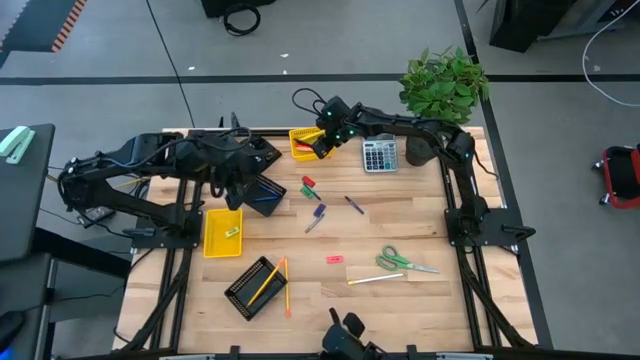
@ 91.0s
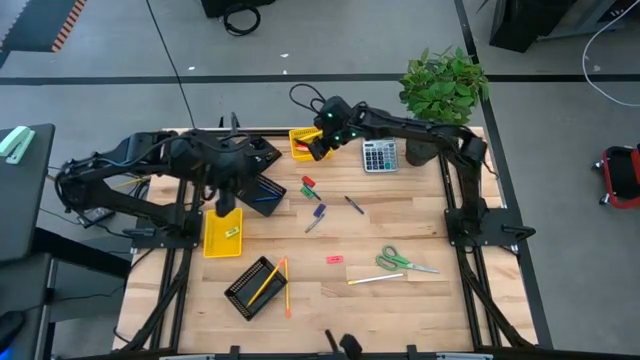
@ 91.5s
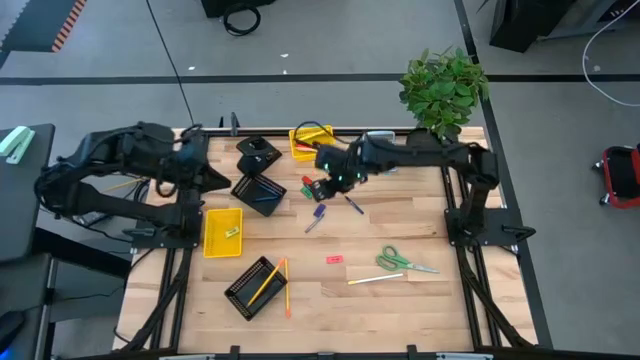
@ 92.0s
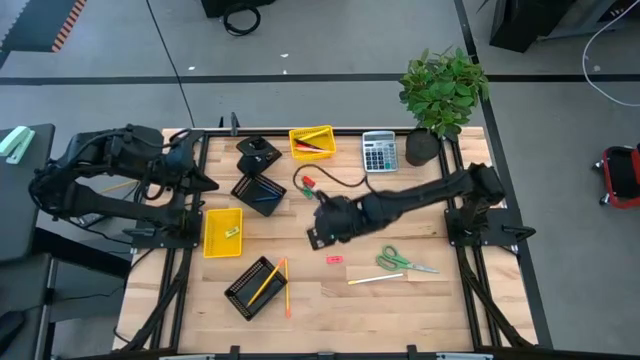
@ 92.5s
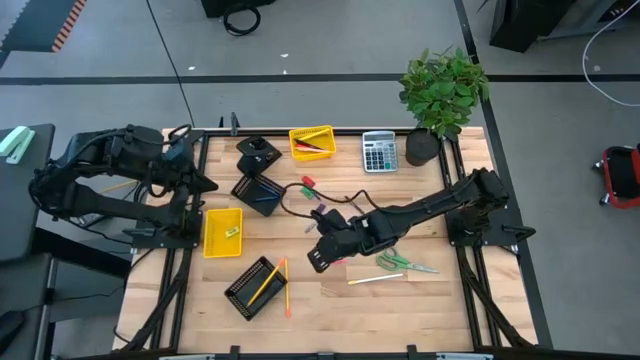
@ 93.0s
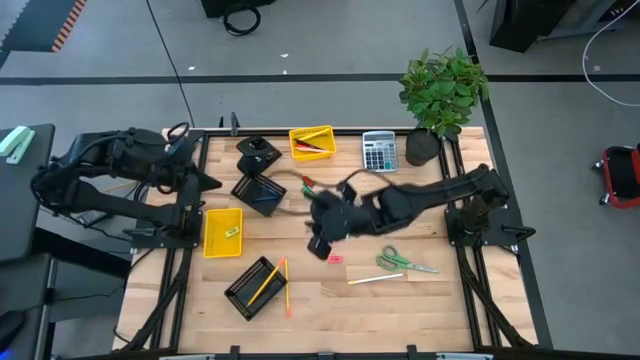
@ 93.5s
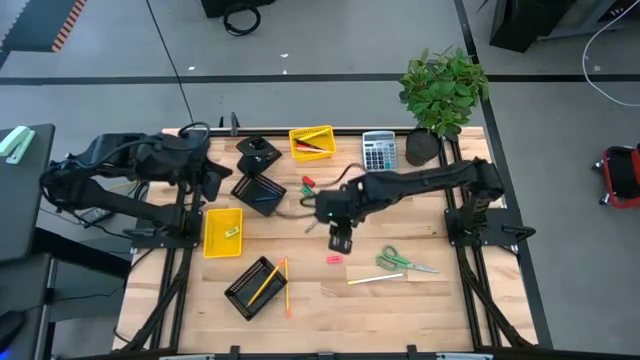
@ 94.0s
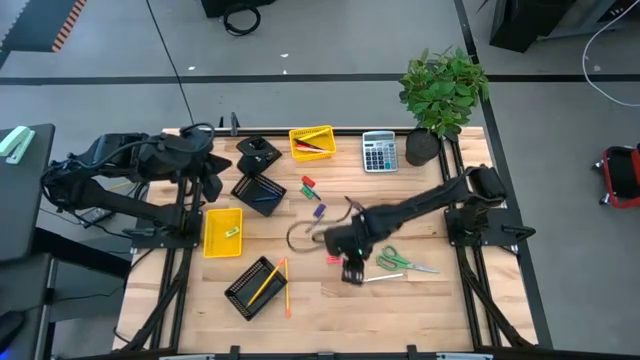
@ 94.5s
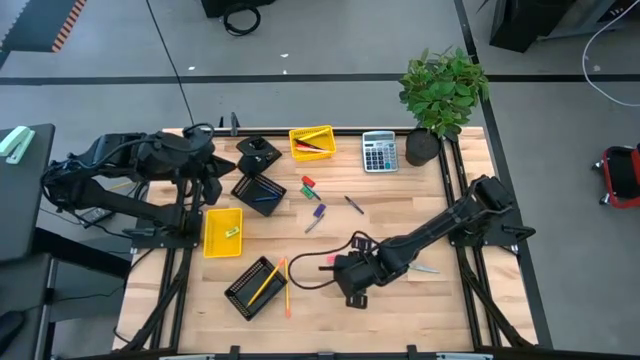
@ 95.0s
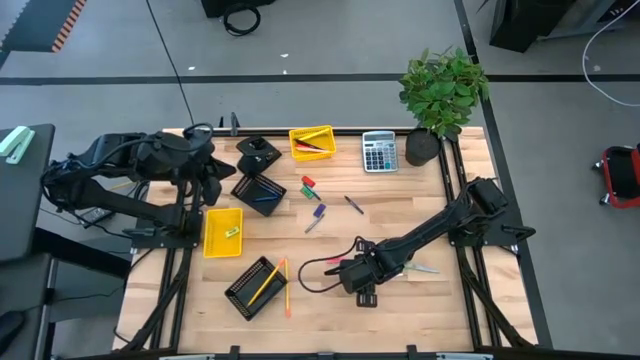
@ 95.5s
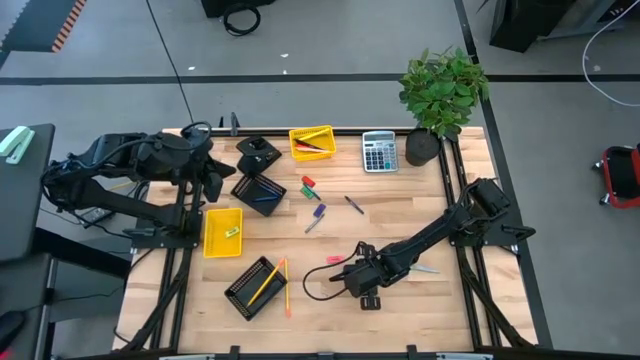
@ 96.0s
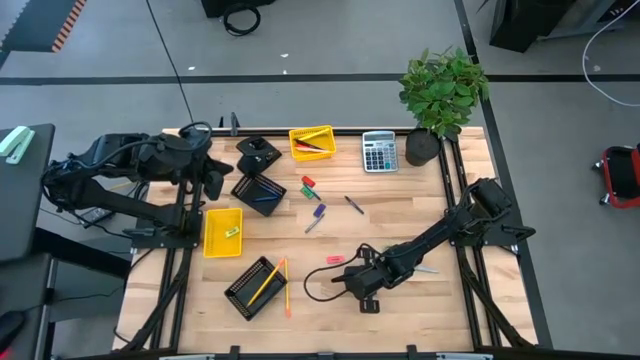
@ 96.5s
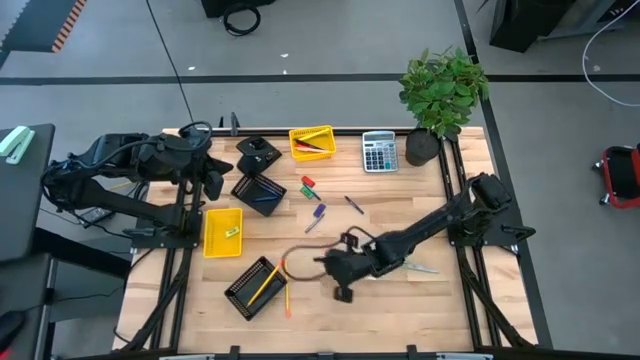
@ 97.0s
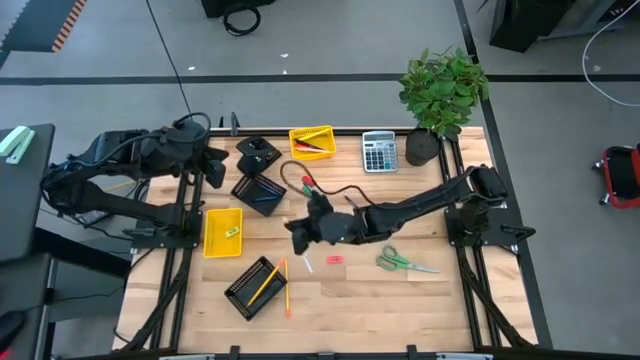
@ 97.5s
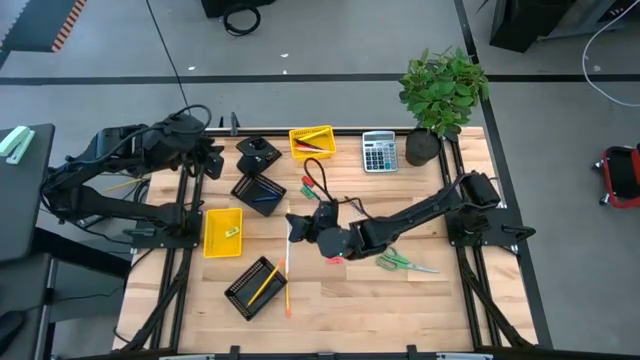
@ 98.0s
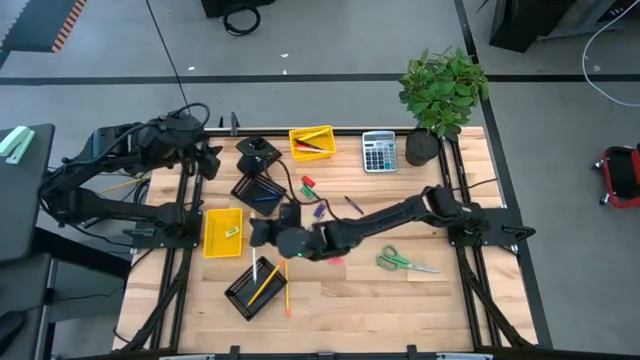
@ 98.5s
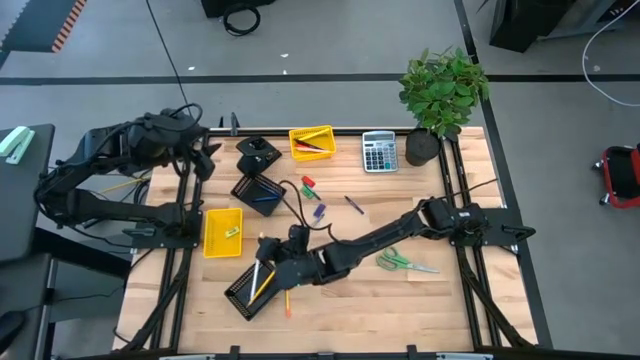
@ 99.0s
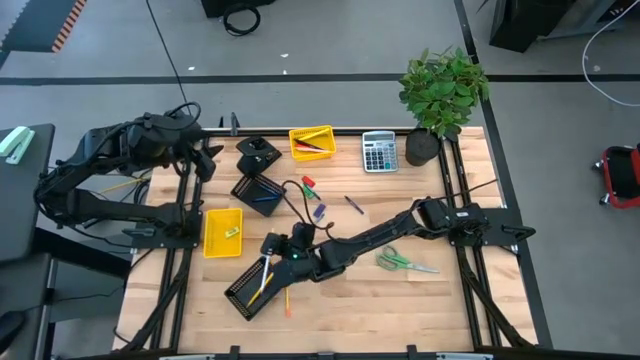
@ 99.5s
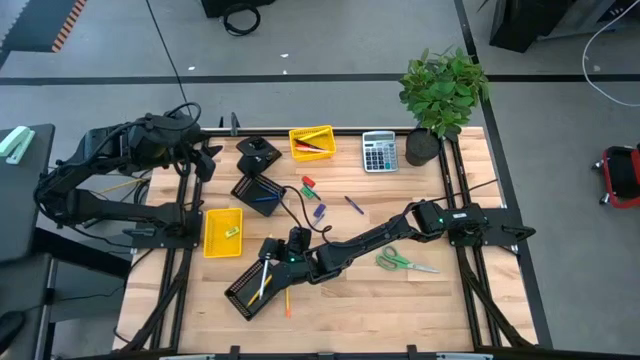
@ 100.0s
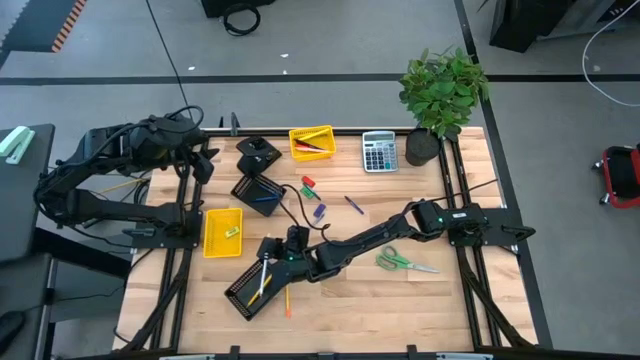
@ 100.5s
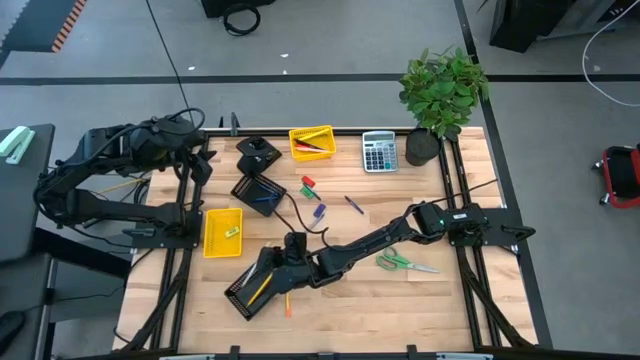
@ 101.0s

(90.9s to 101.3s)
Task: Sort crayons/erasers/pens/pencils in bins
Put the white pencil into the bottom black basket

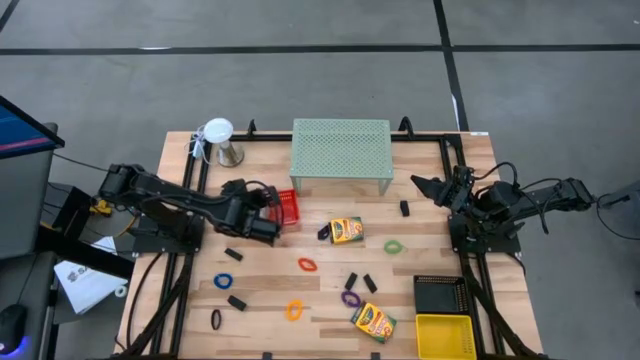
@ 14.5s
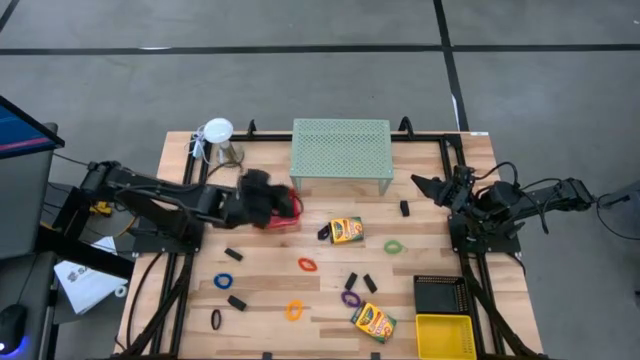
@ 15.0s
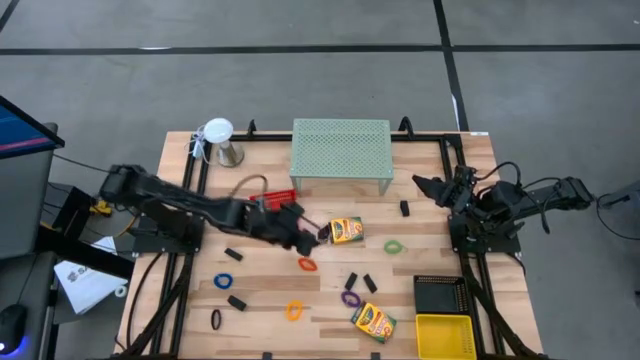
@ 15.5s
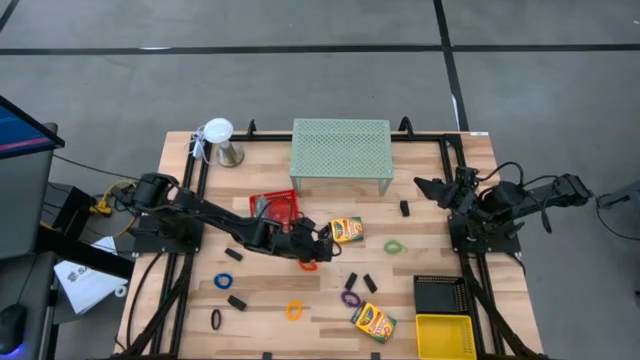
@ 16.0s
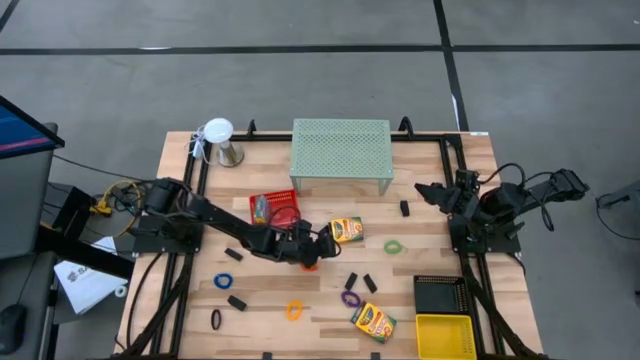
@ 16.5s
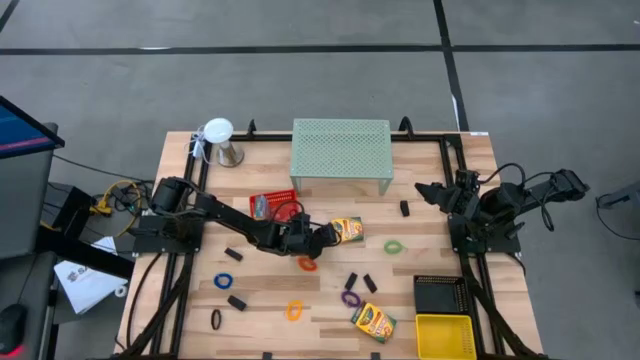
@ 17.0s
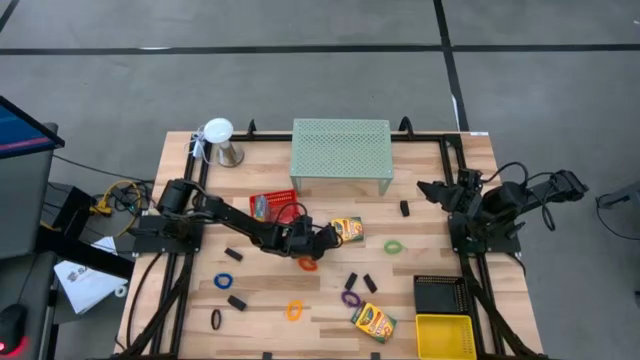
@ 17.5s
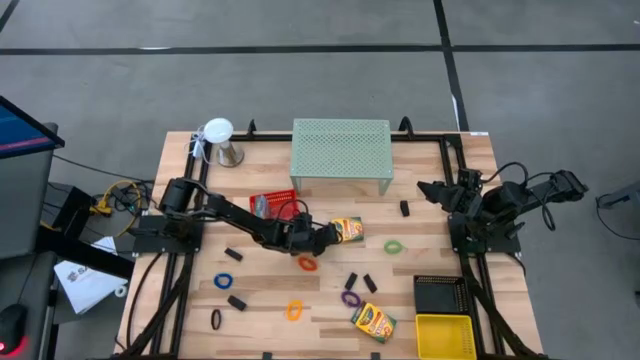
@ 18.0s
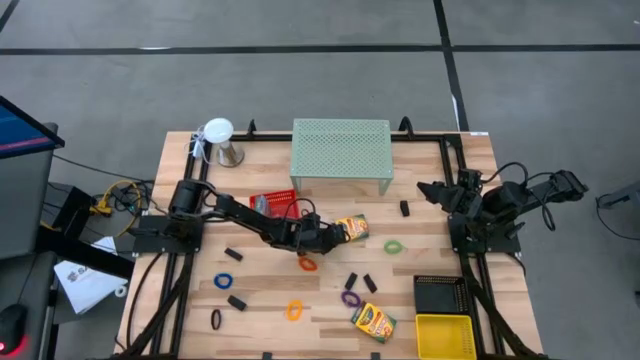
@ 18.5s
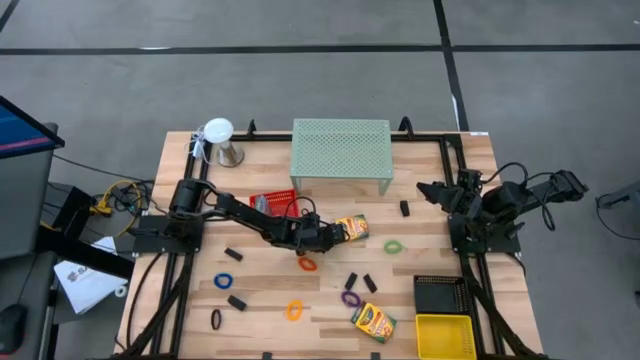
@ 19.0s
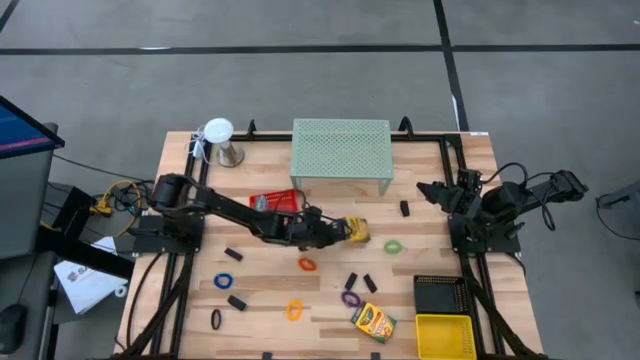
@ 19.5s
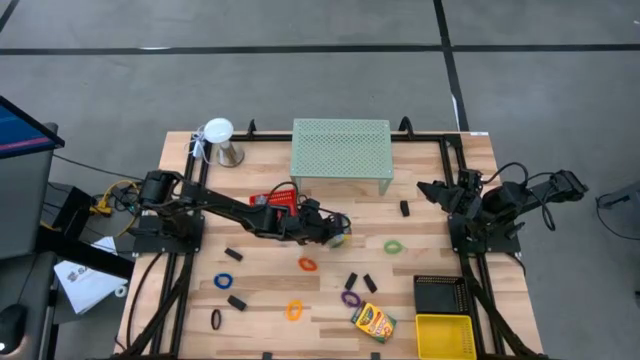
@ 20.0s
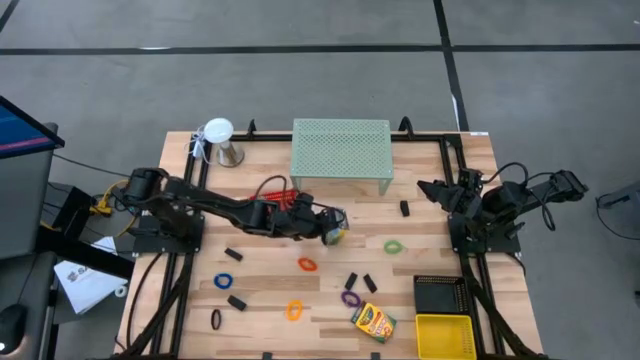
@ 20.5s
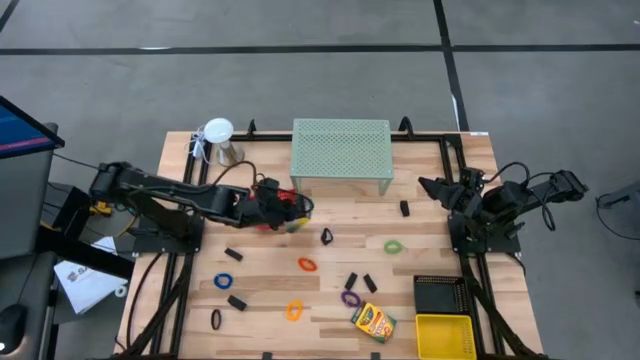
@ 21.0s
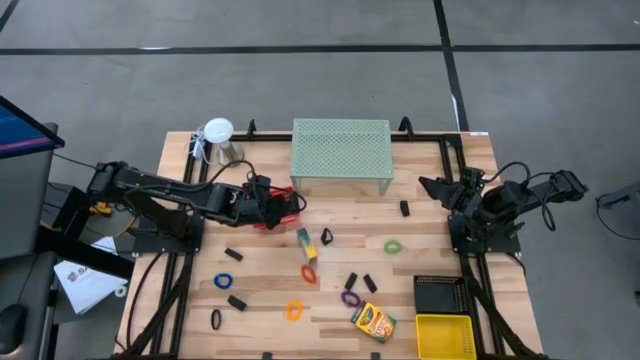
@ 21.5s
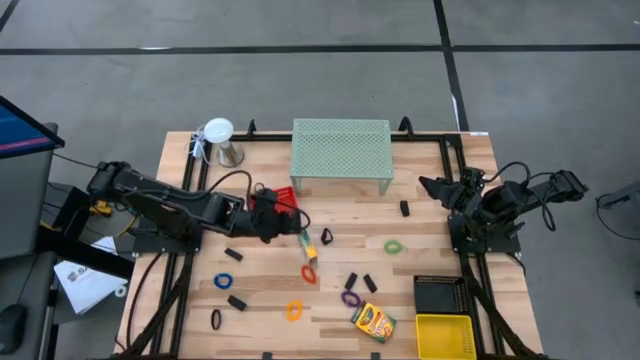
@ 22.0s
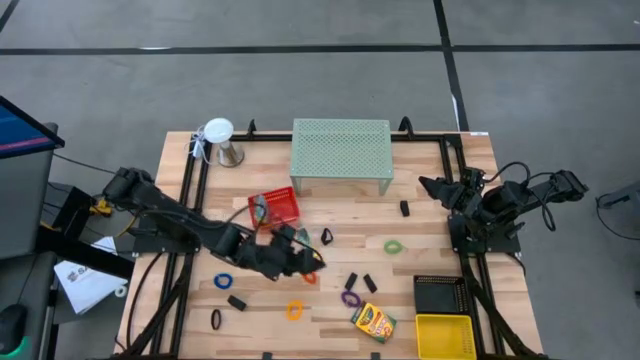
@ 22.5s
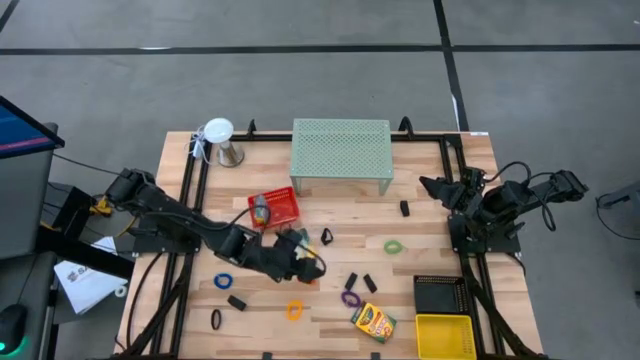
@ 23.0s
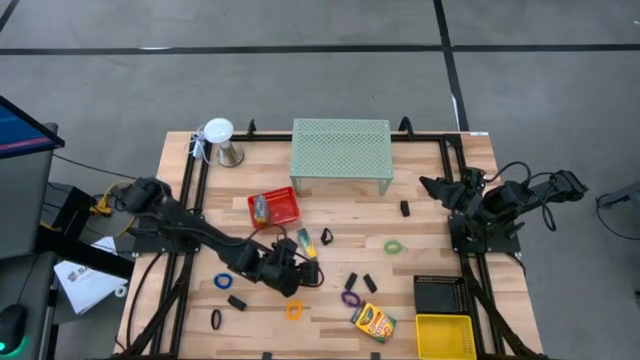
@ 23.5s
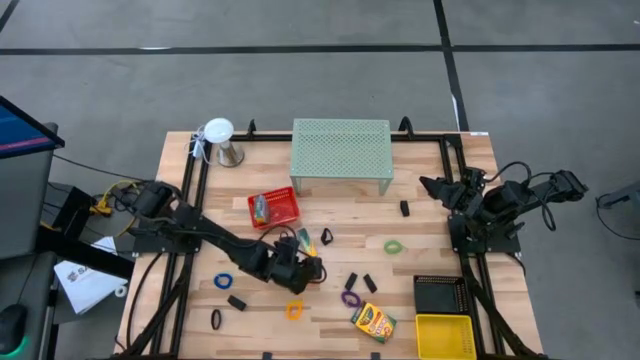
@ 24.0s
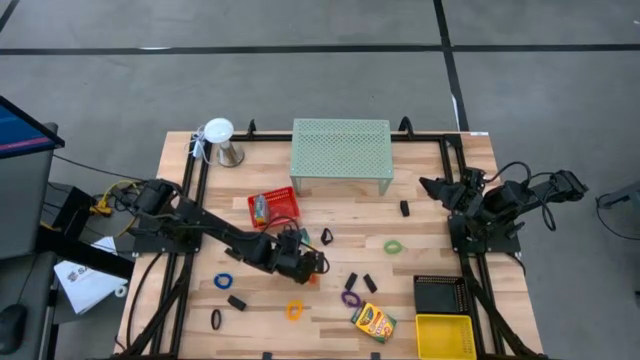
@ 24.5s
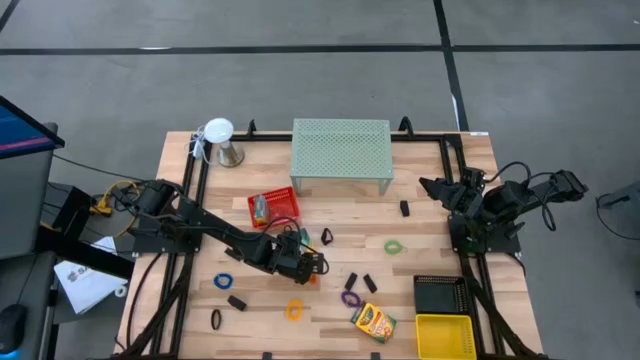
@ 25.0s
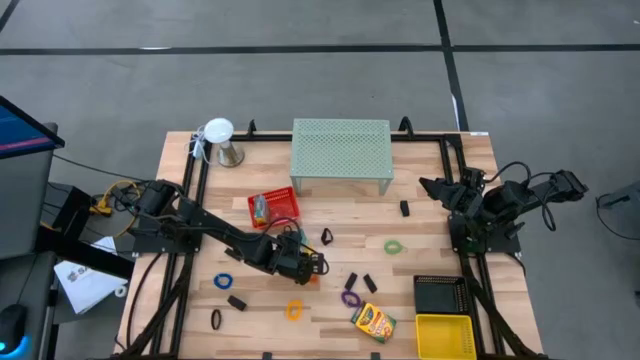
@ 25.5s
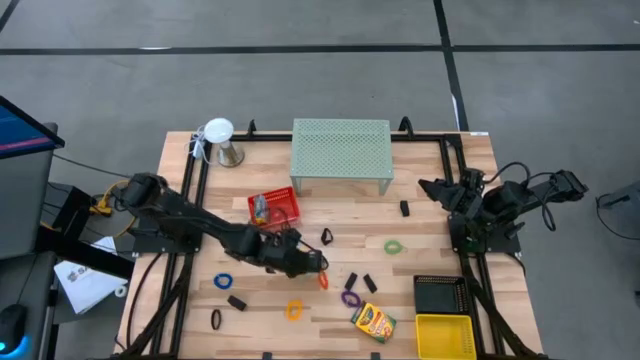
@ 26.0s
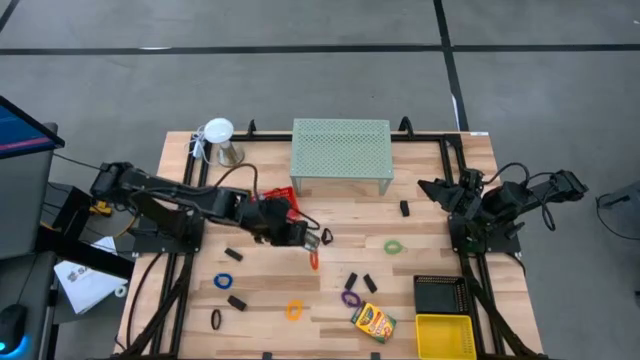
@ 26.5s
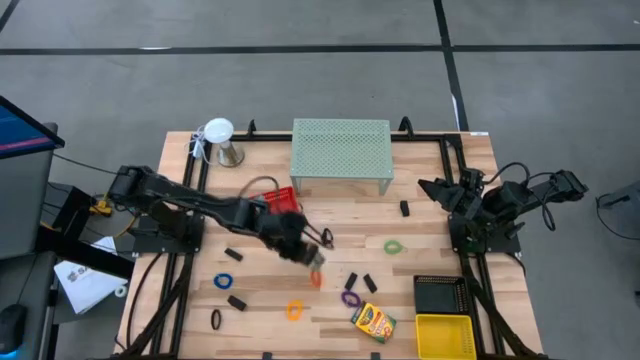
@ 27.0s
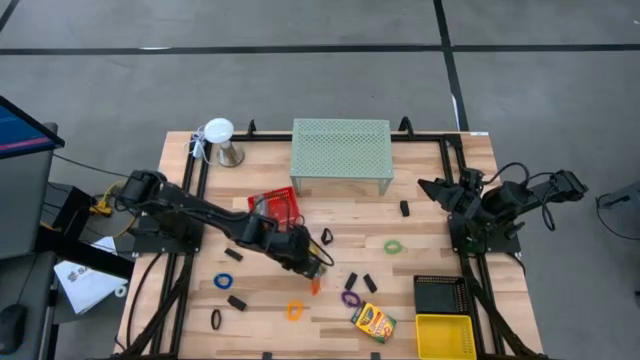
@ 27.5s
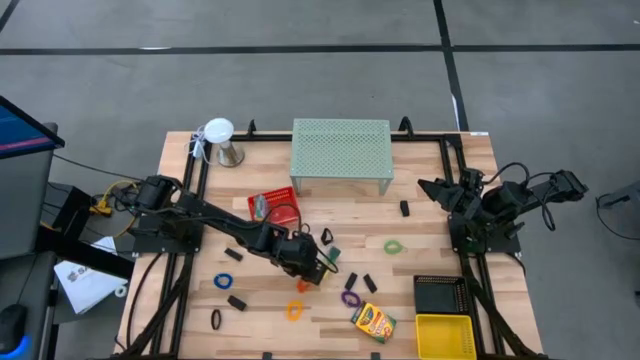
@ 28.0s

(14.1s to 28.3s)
Task: Pick & Place Office Desk Supplies
Put the yellow crayon box into the red bin
